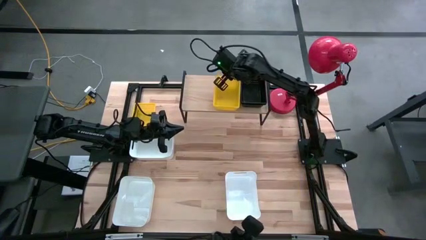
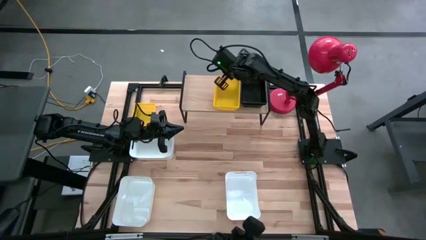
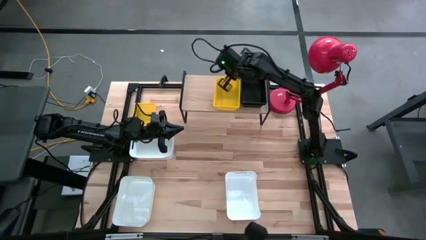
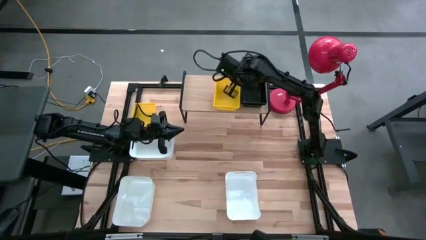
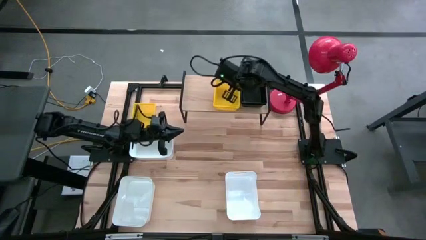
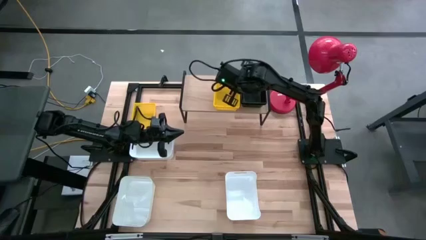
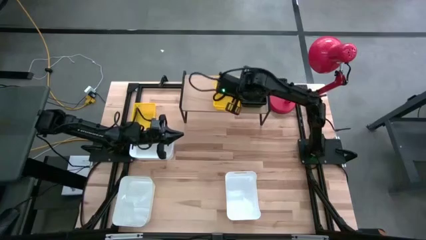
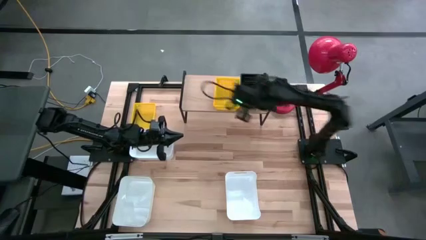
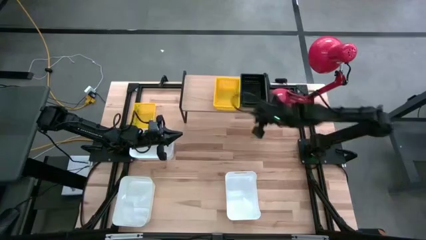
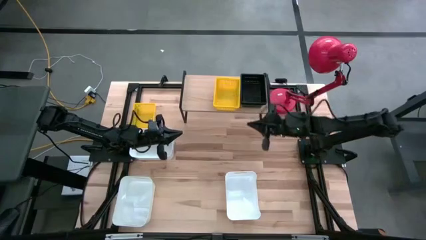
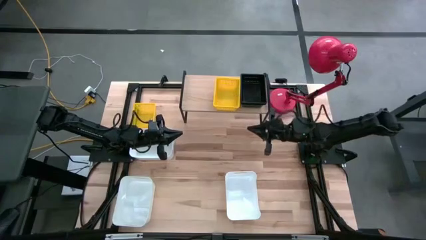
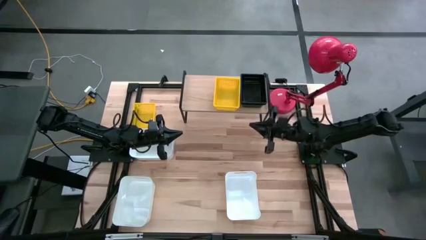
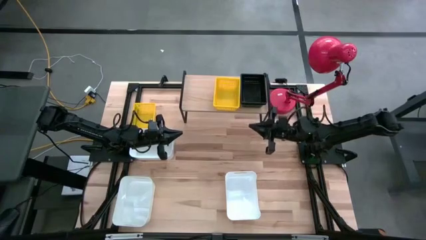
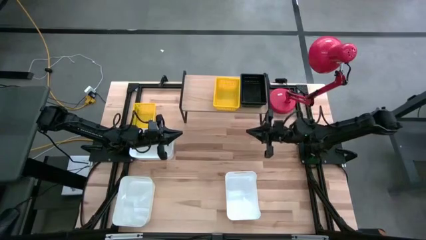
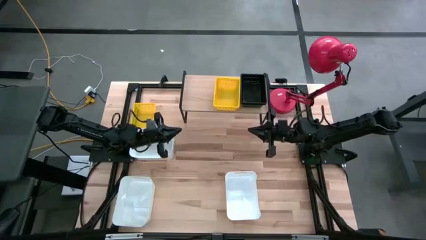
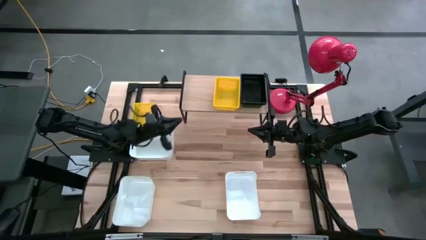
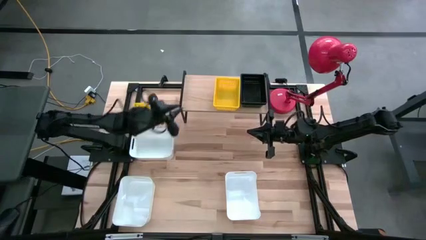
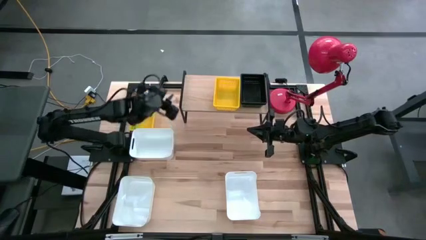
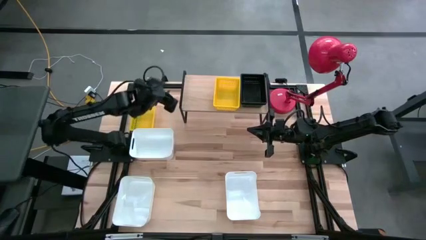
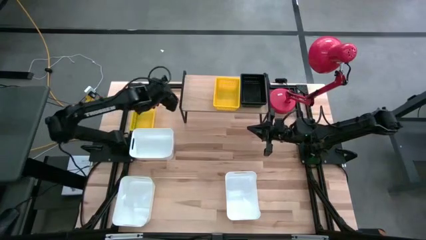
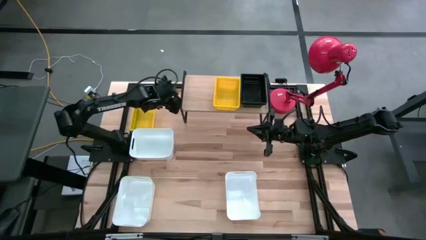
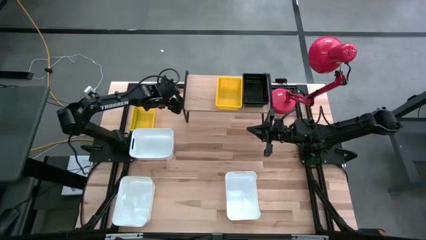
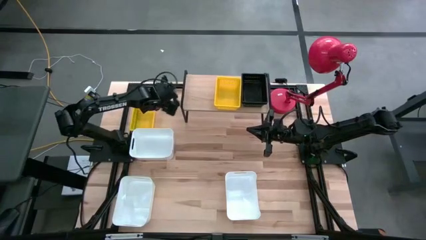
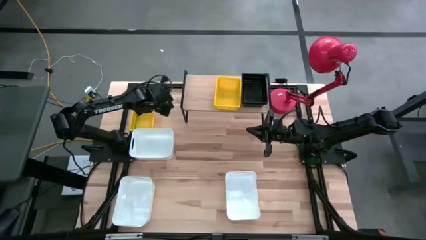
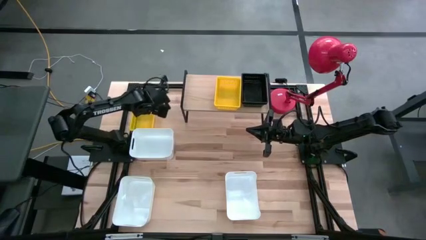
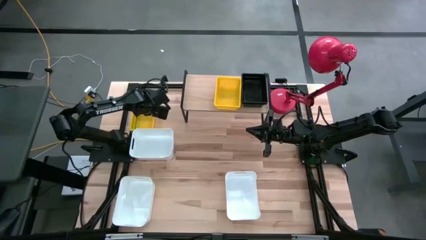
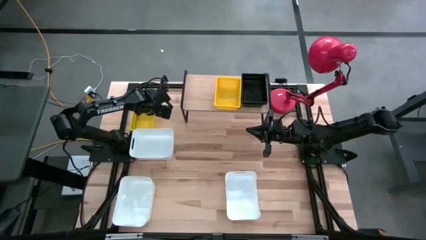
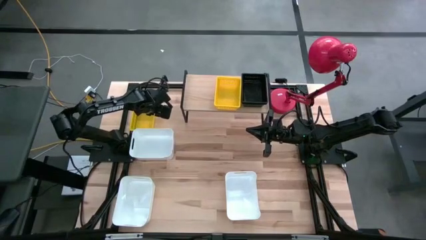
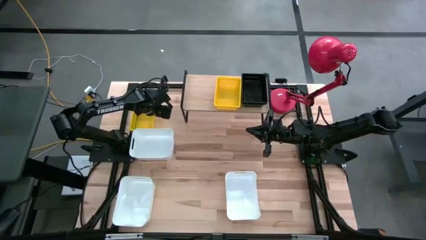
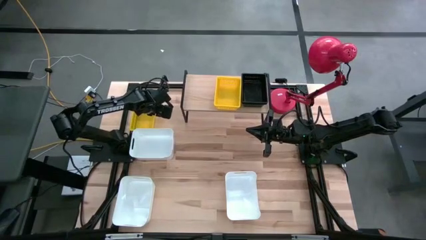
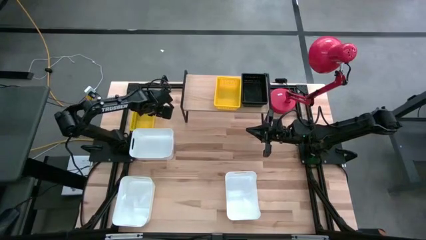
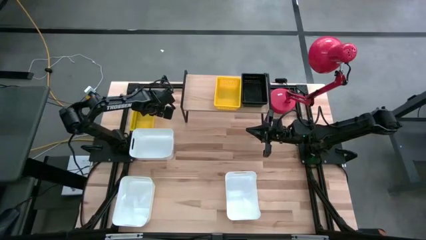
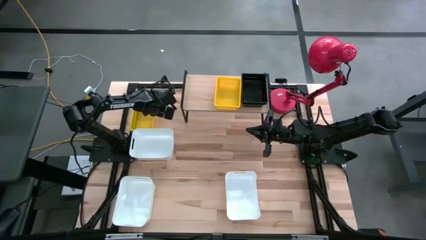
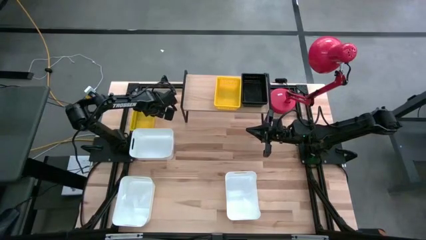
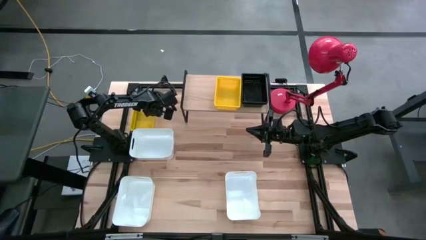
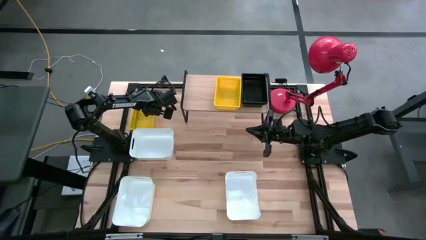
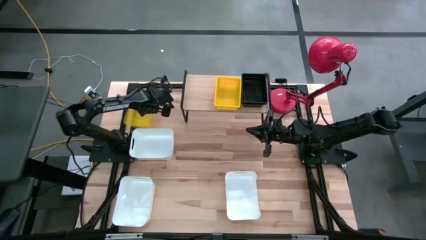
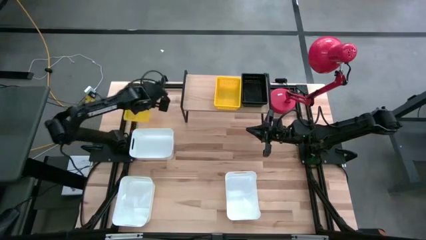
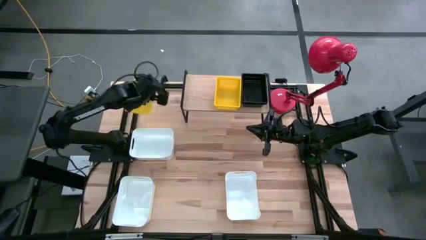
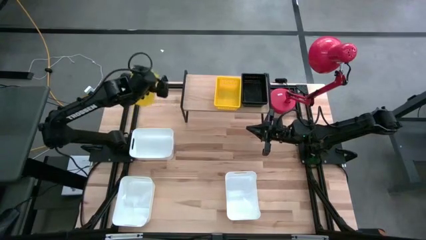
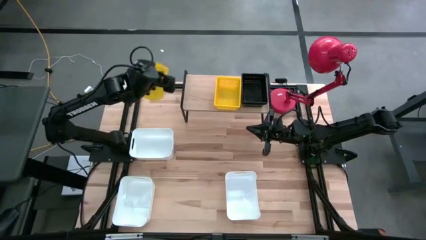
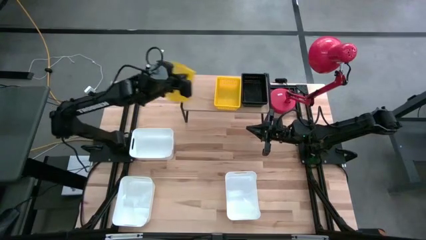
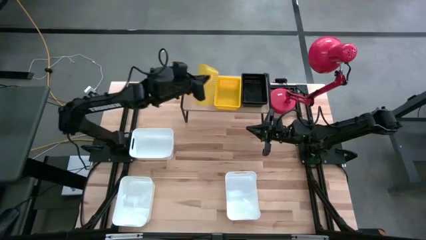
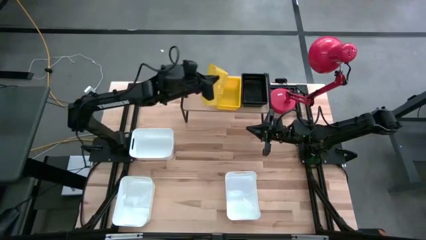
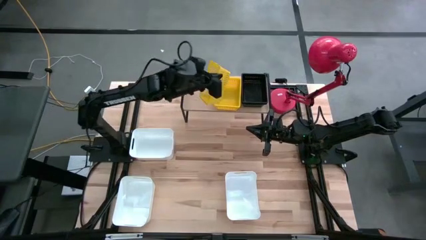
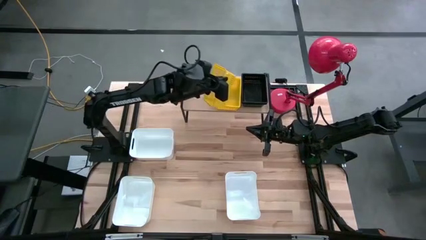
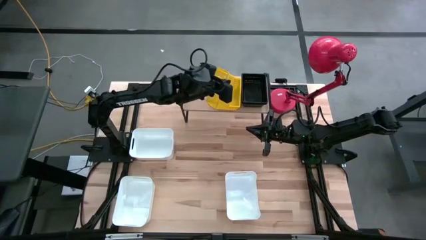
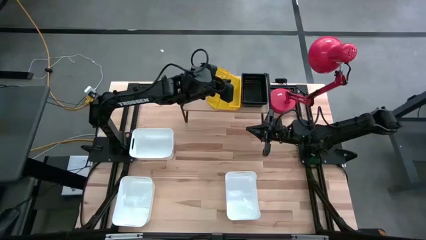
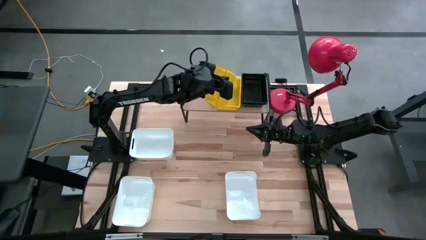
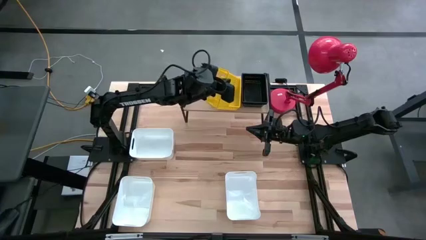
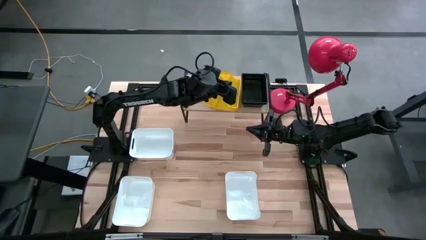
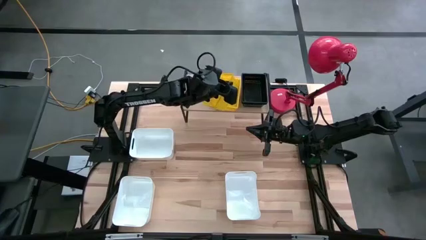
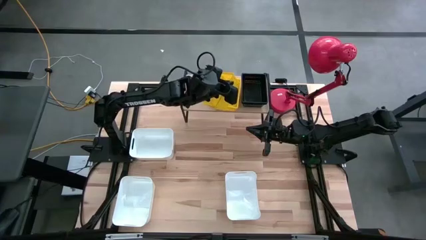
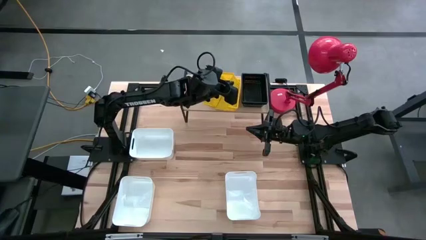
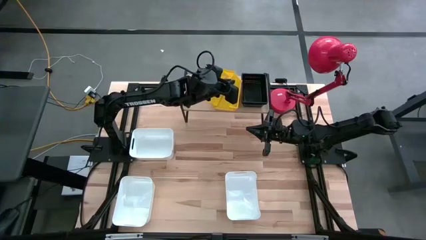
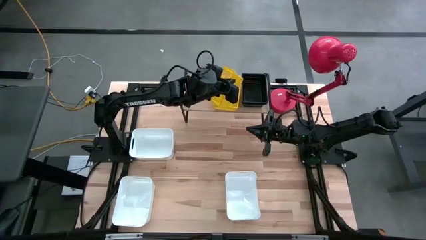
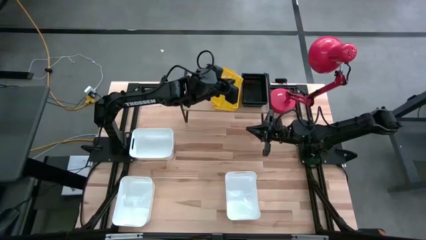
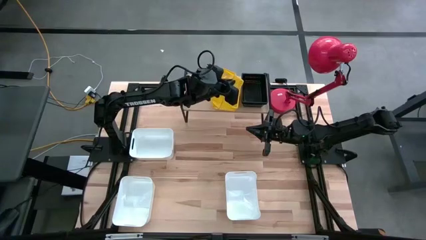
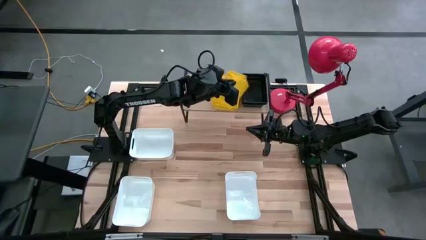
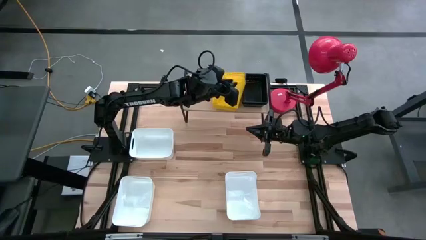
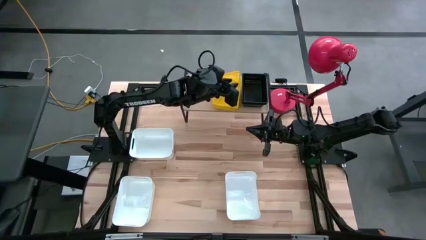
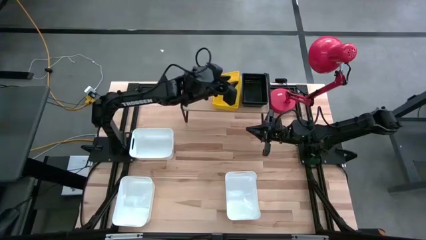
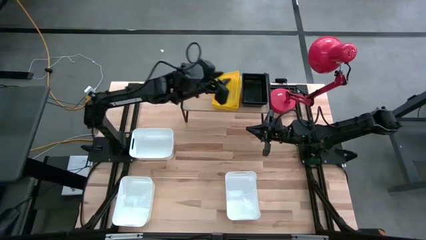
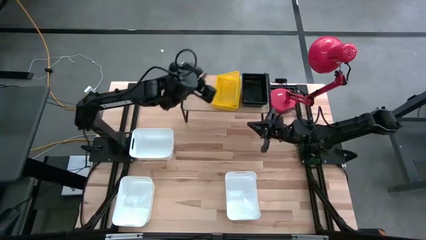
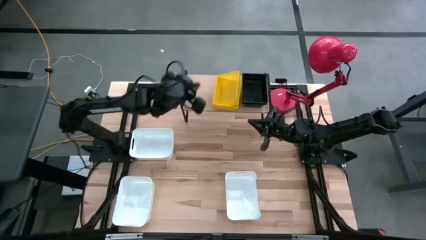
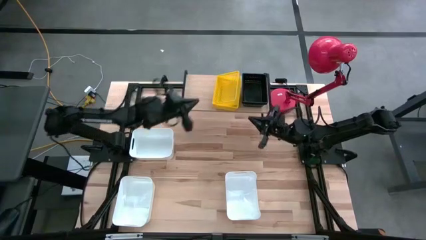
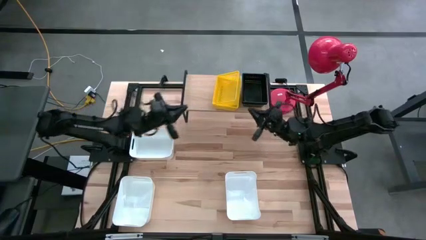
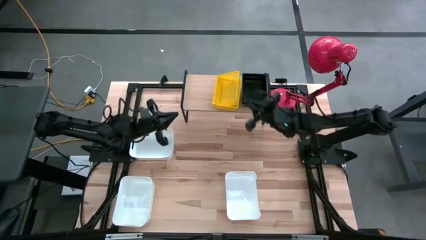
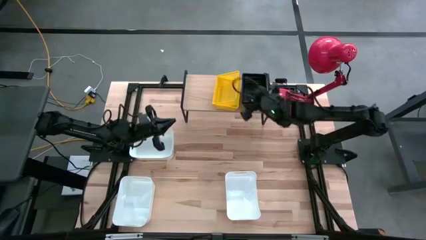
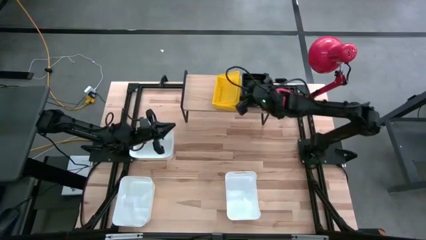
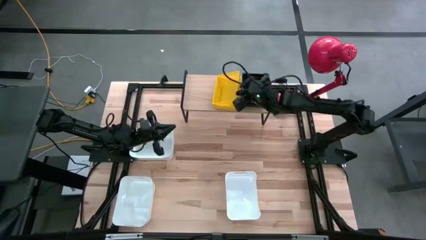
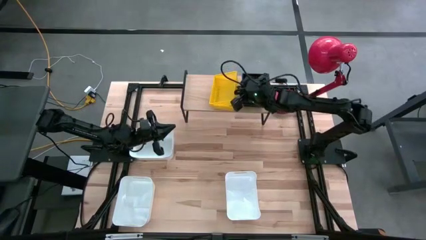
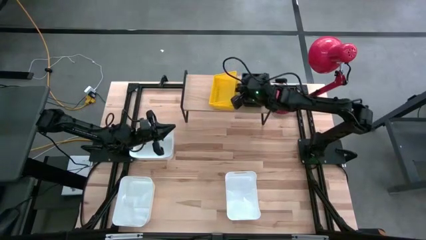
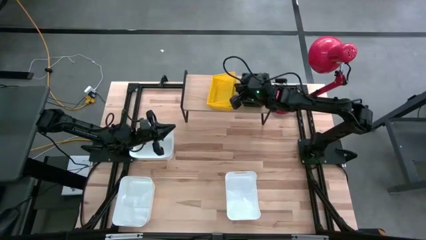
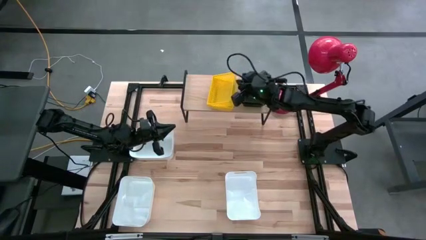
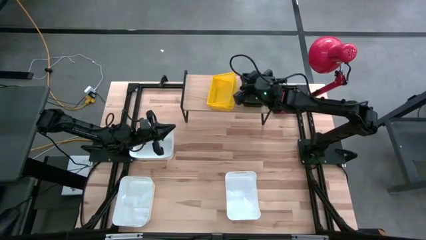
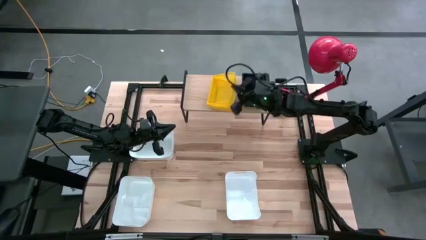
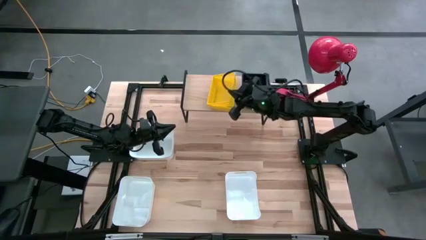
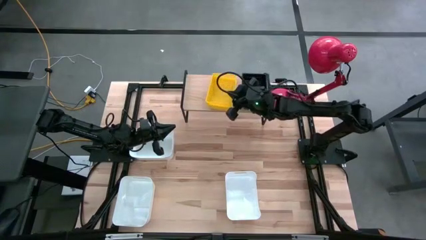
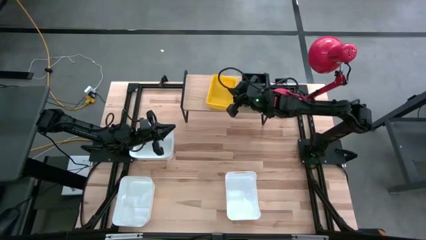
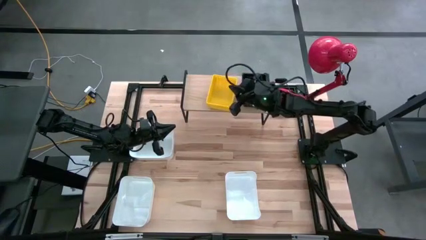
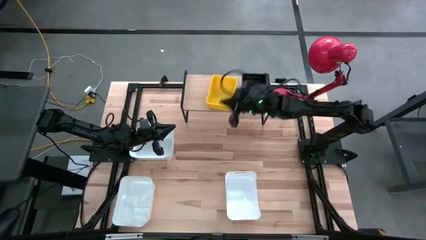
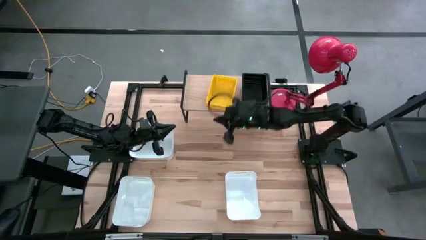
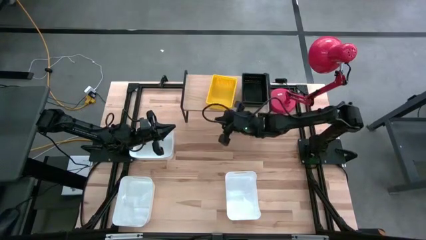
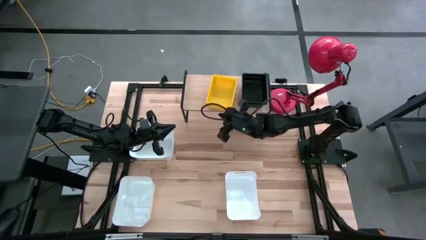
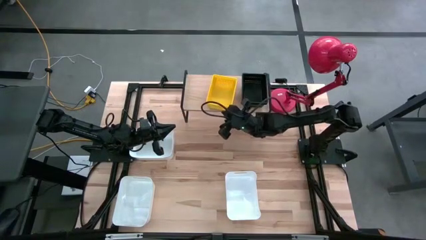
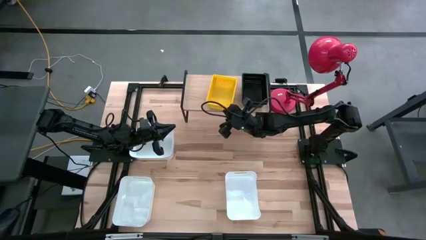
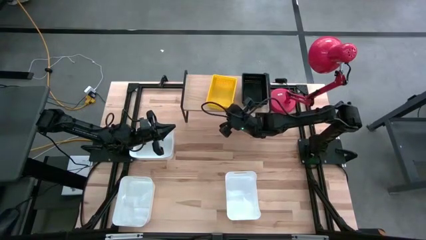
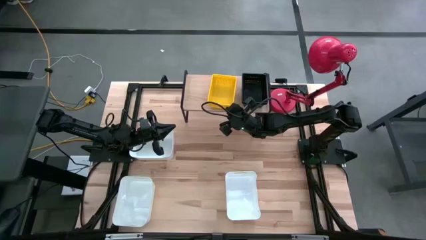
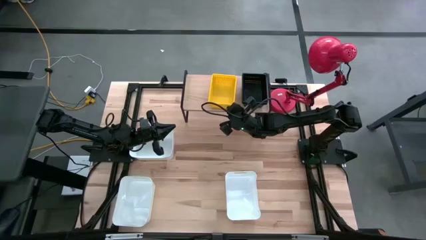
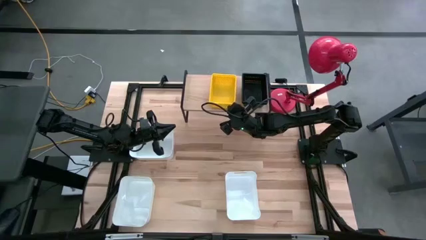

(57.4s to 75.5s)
Task: Stack baskets on shelf by color
Stack the yellow bin on the other yellow bin on the shelf
